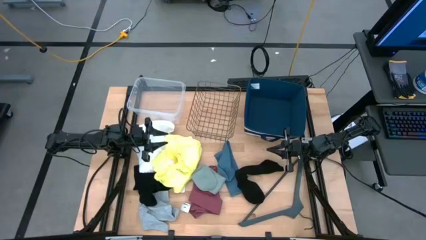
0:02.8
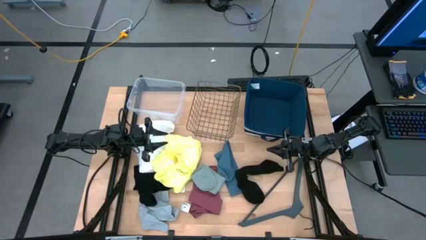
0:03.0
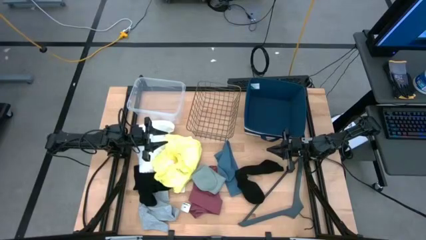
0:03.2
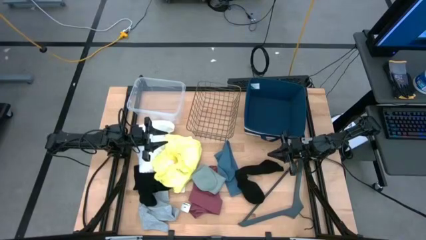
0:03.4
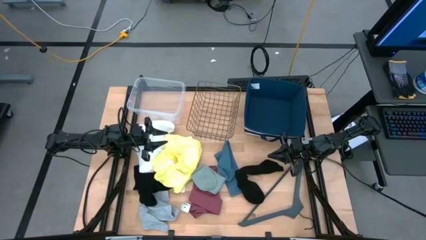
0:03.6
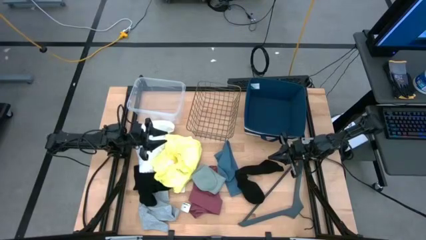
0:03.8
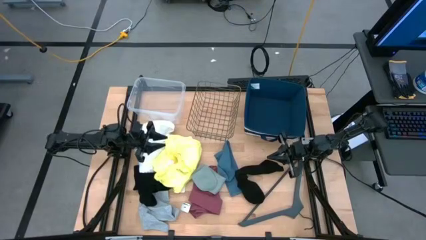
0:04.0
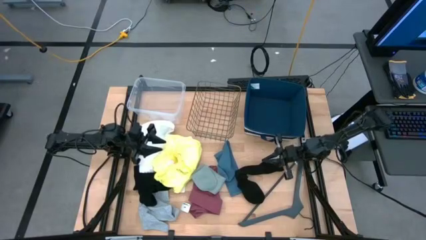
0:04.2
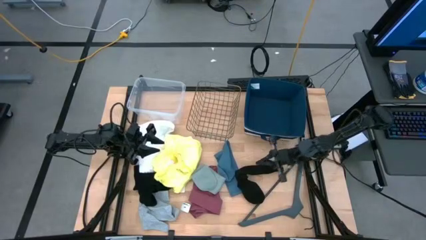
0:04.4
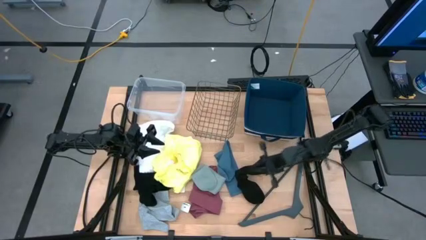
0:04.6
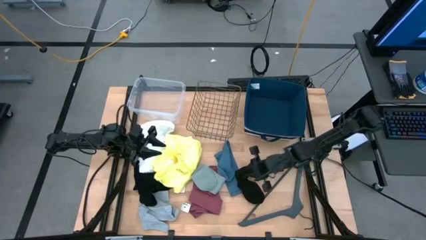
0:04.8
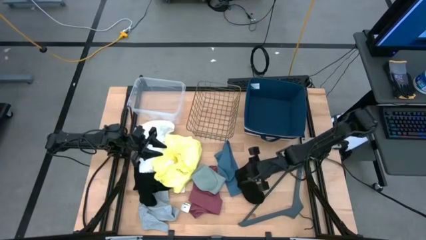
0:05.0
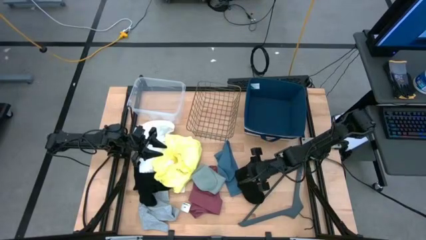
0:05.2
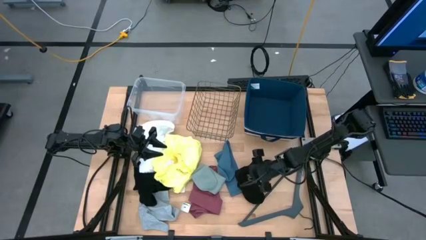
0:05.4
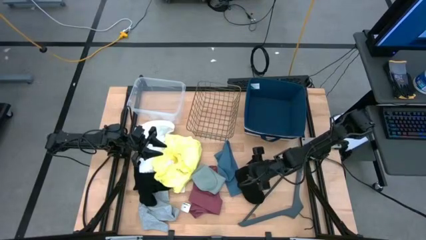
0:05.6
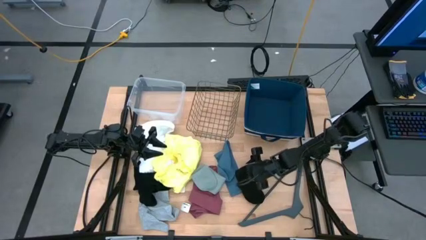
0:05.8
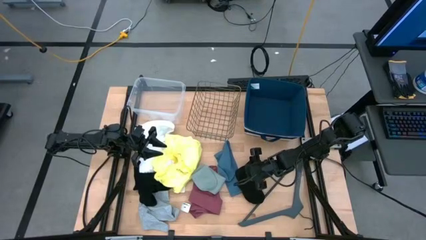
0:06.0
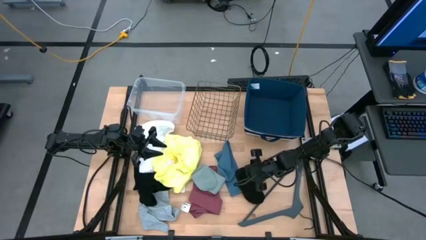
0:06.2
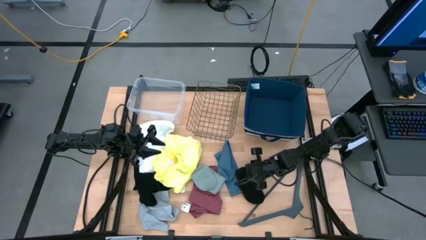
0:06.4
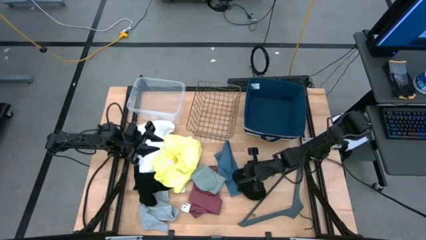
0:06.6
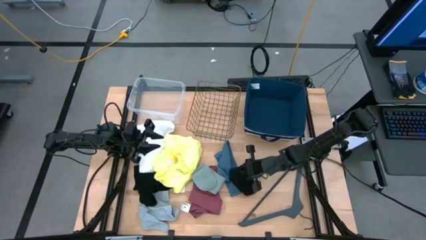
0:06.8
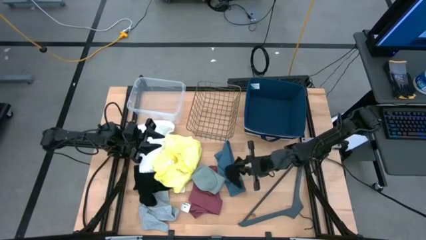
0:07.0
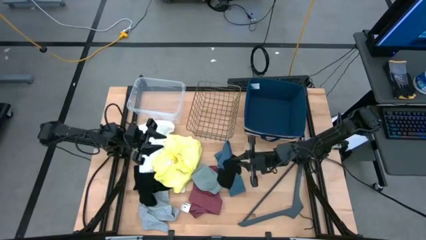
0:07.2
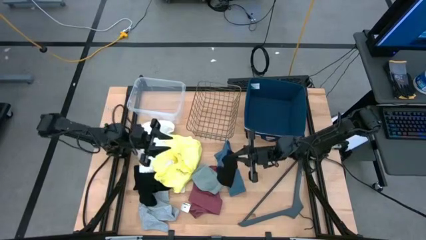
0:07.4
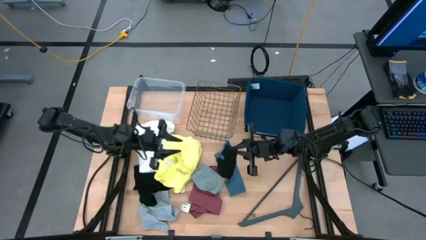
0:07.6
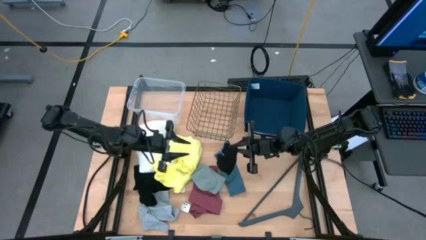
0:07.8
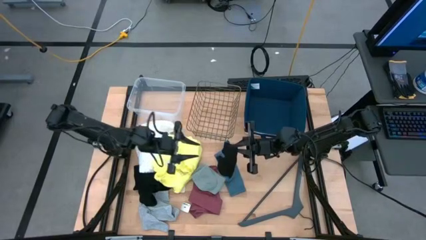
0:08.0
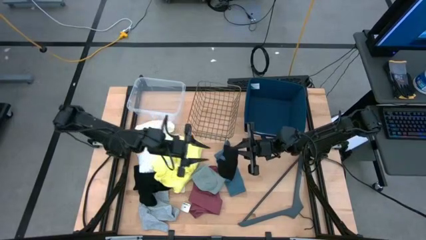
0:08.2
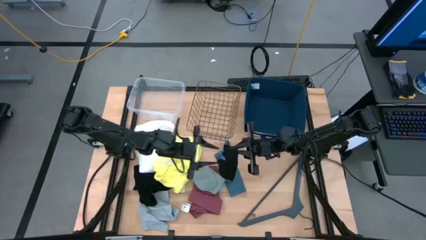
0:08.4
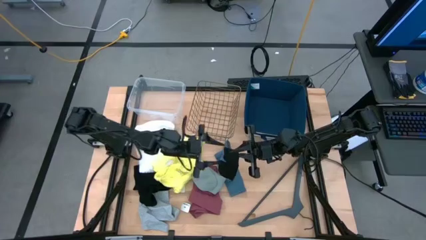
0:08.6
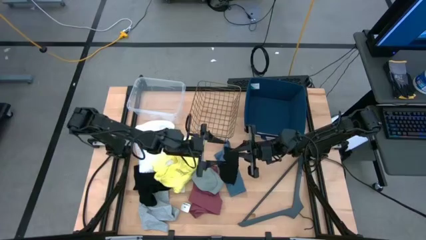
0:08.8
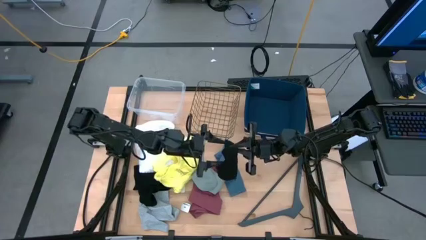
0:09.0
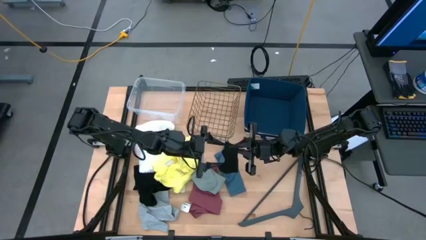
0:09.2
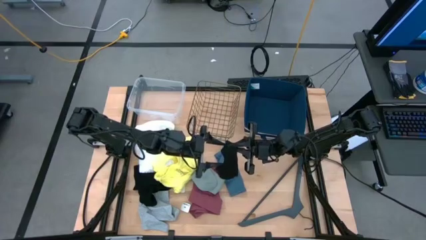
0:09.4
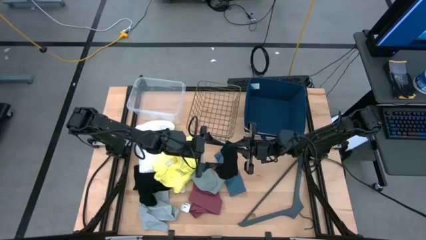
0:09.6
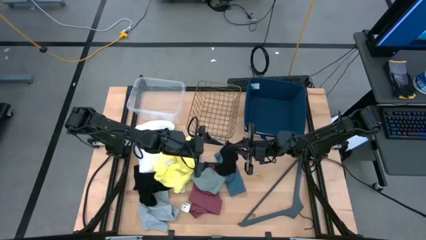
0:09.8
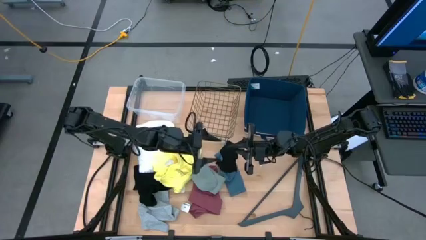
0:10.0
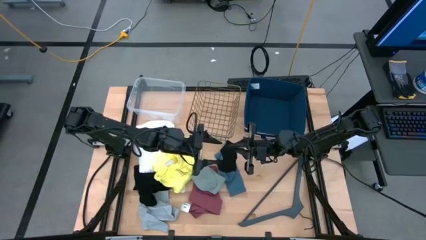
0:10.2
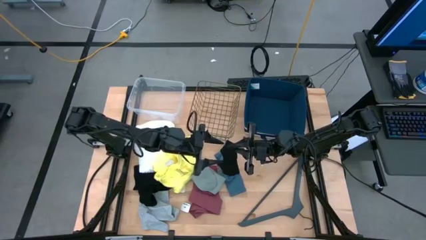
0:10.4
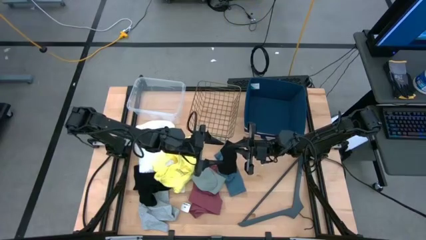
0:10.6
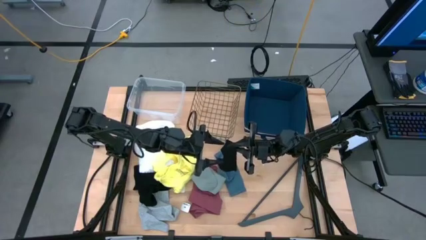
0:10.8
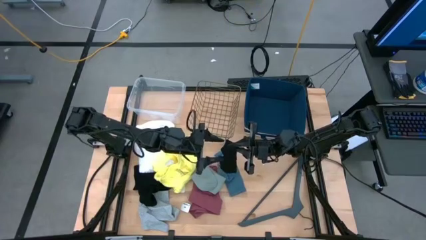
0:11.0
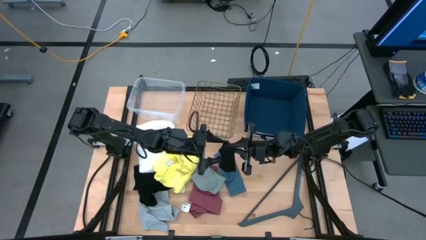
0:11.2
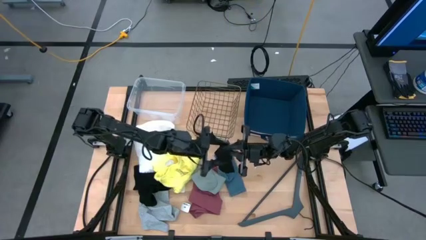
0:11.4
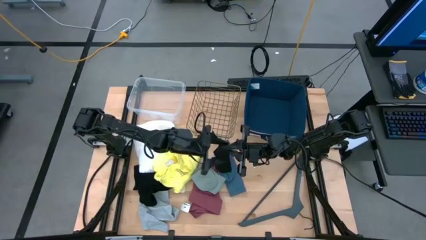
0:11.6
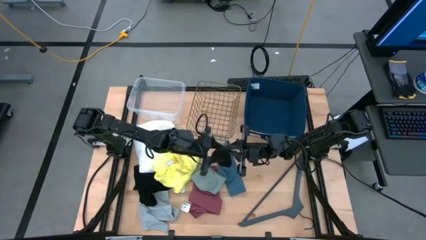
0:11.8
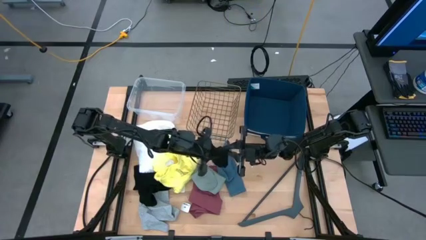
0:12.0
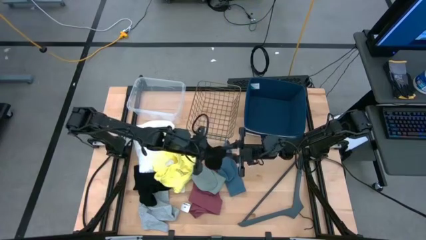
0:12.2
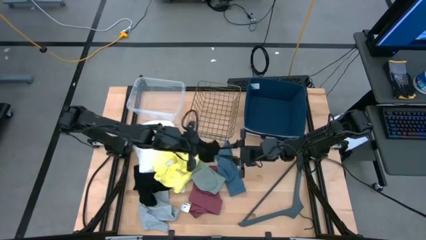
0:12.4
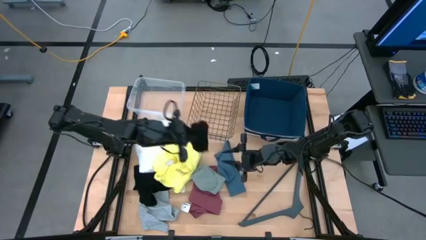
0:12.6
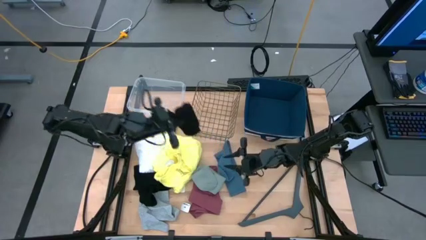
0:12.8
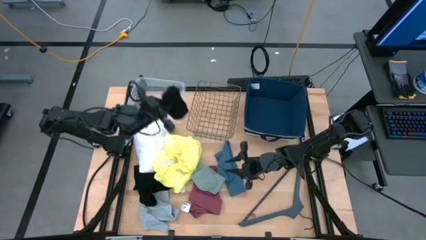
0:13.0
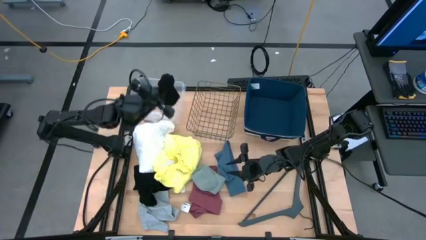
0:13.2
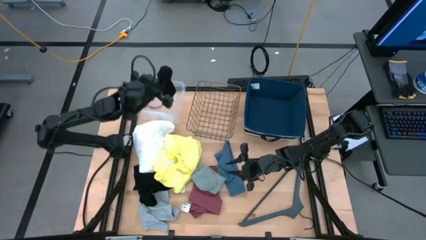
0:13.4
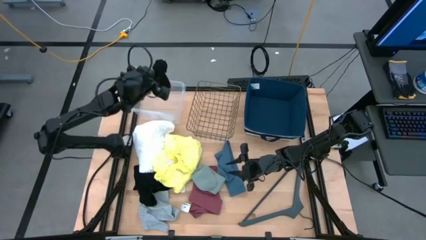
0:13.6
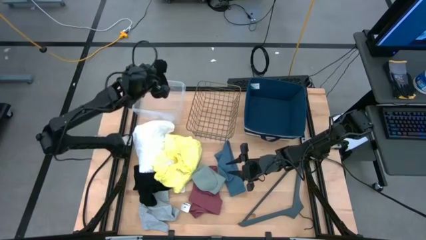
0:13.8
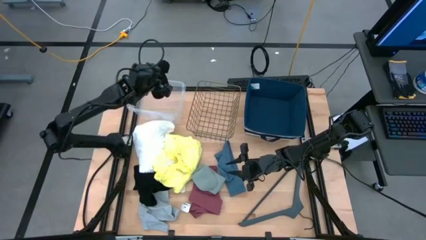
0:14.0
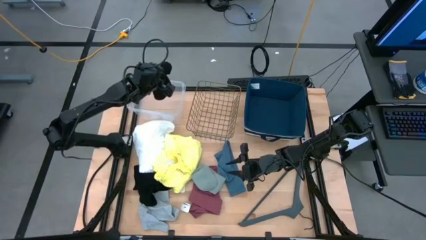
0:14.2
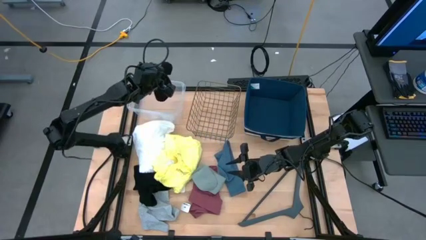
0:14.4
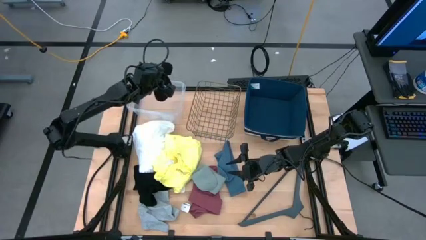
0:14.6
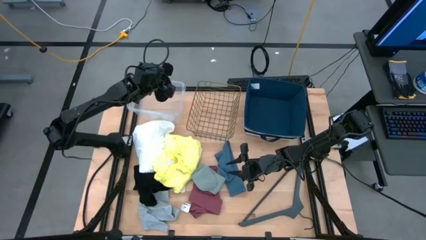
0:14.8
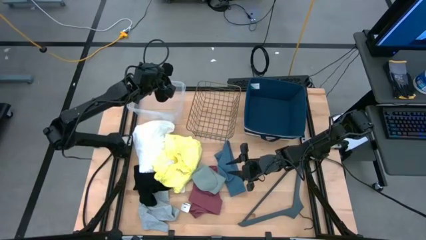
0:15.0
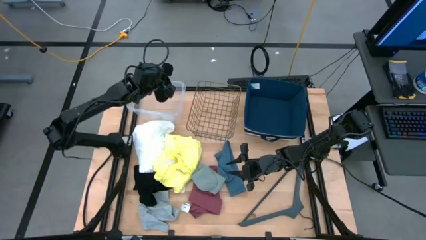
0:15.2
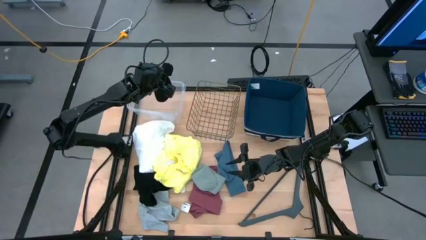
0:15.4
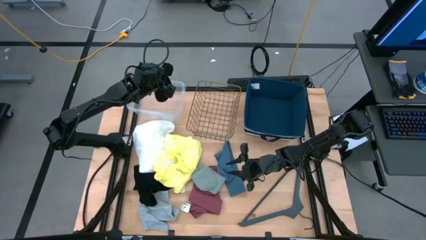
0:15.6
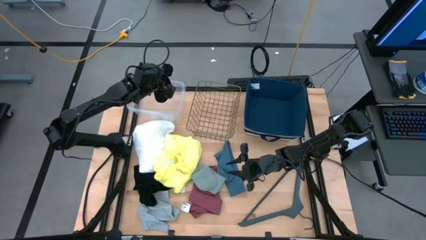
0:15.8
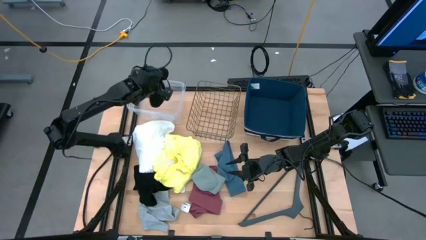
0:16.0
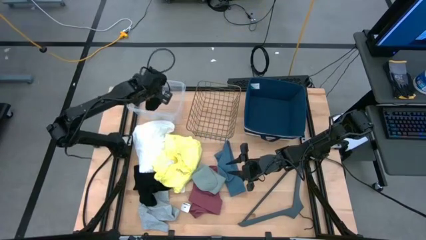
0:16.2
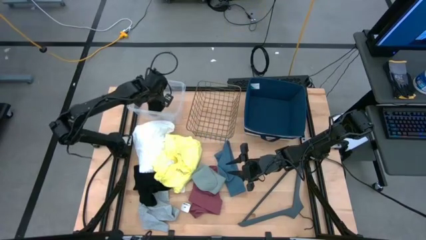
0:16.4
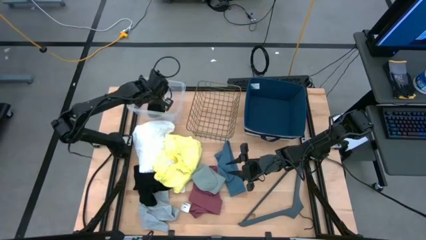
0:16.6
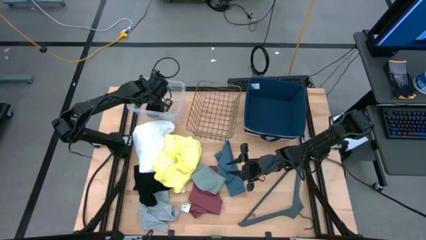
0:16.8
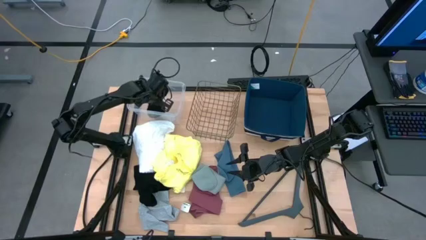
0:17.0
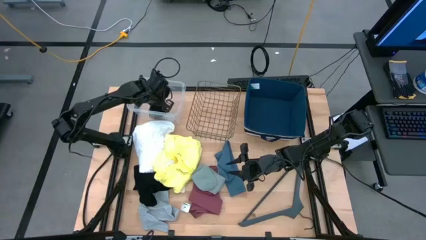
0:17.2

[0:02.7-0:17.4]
Task: Pick & Place Cloths
Put the black sock into the transparent bin
